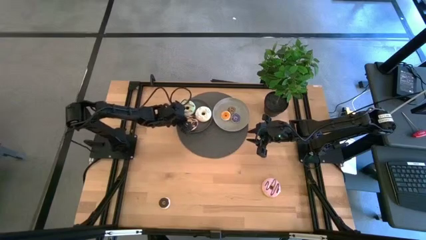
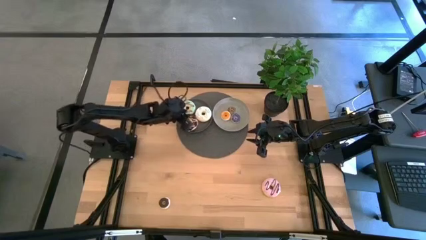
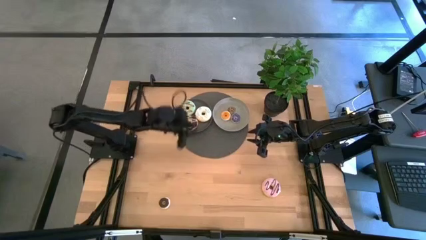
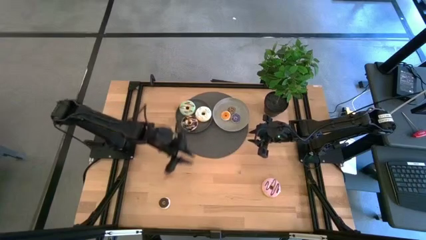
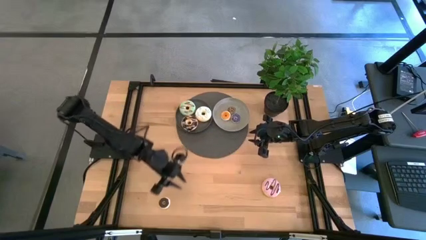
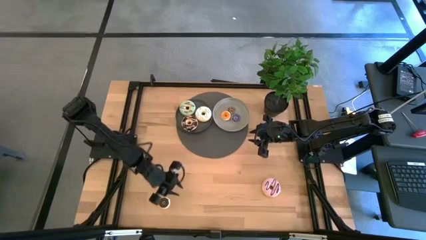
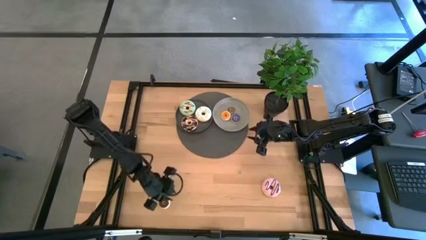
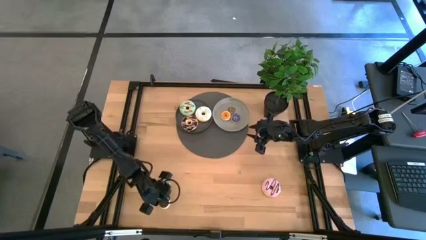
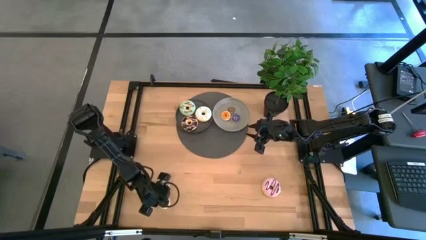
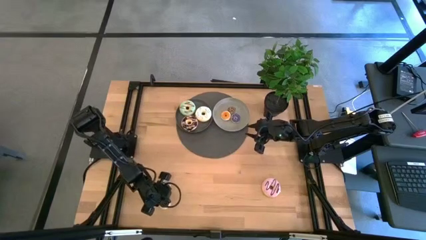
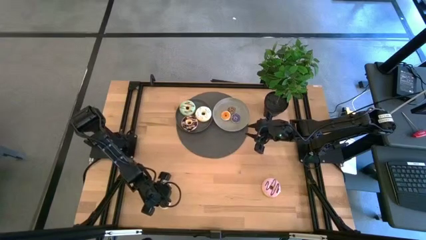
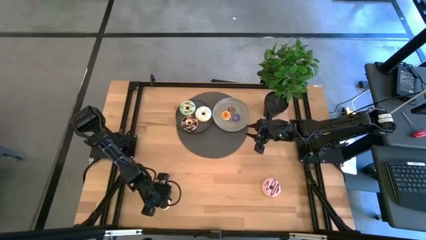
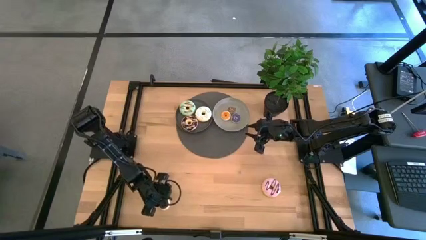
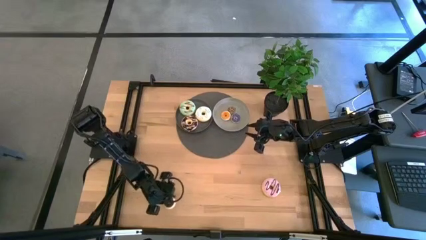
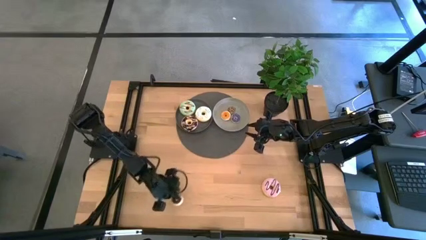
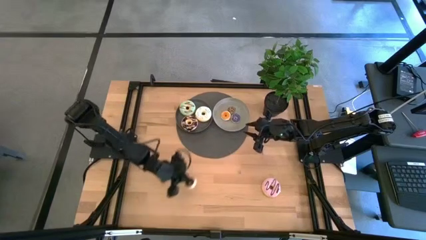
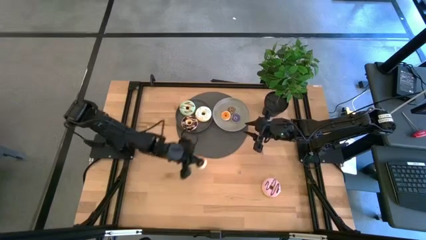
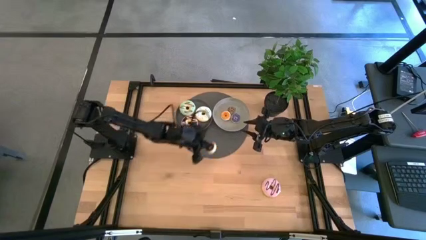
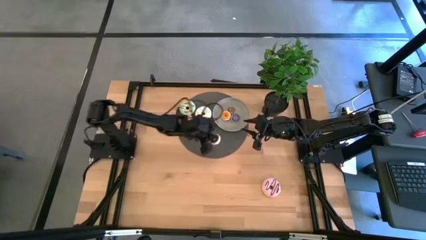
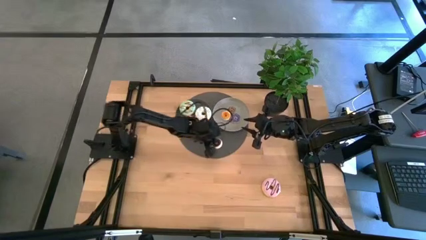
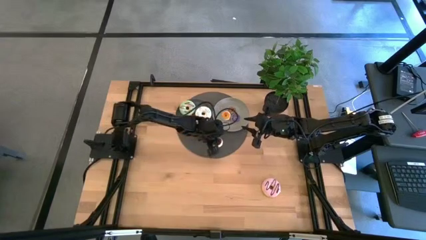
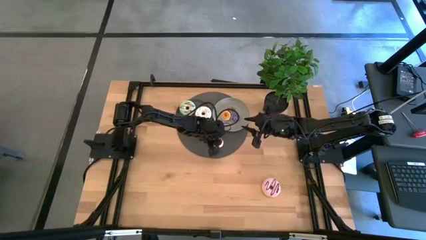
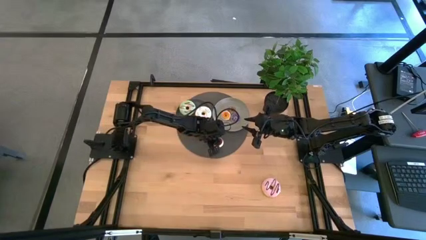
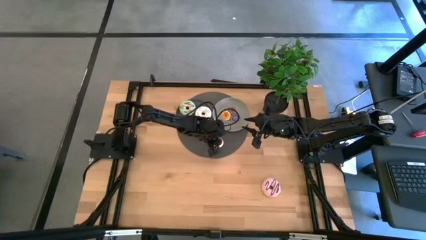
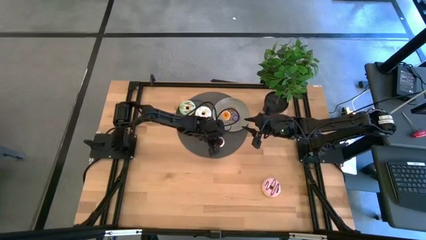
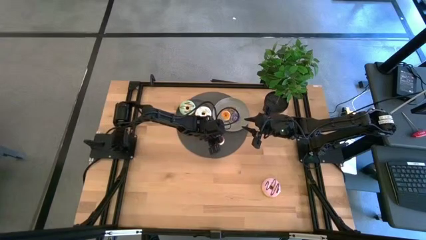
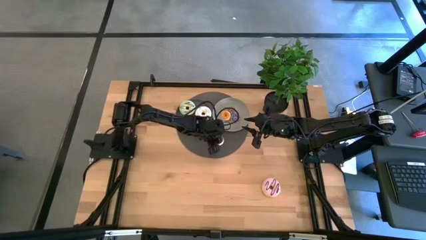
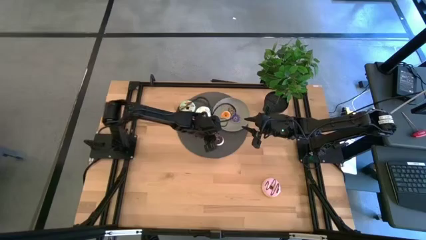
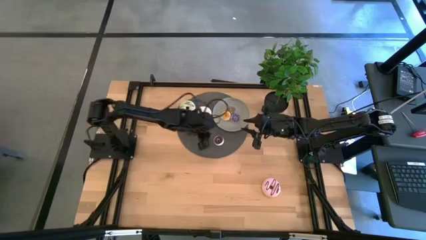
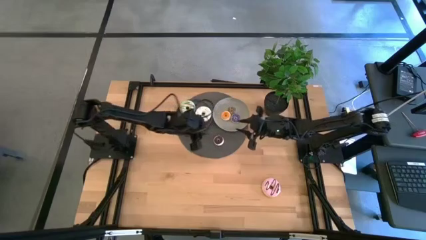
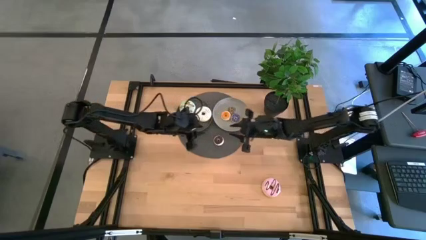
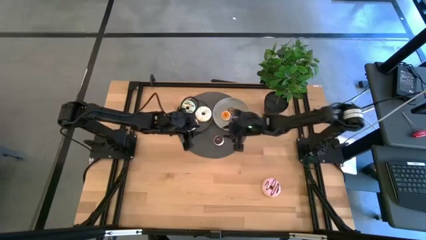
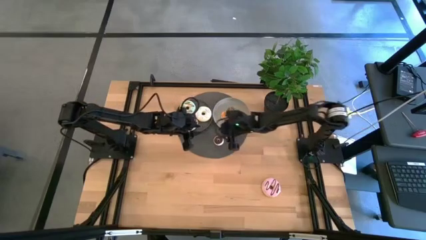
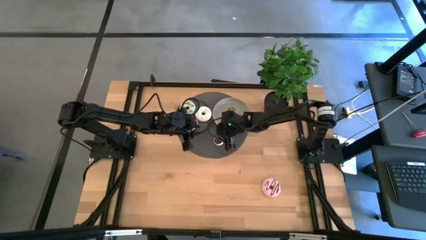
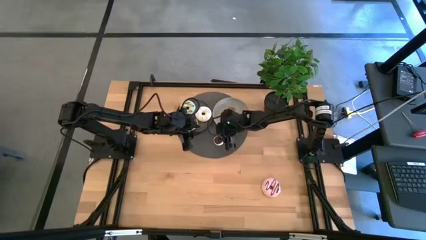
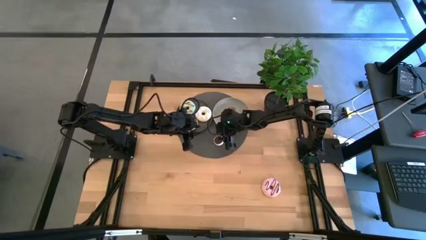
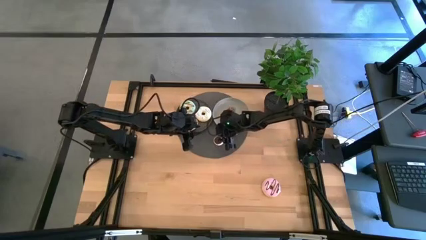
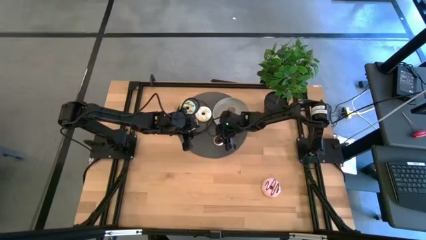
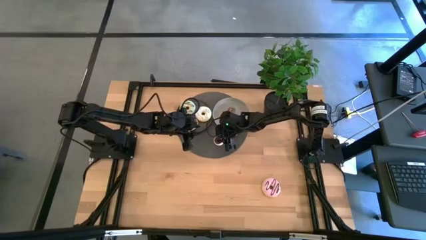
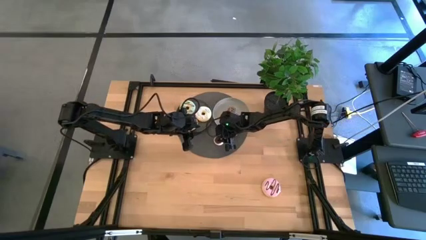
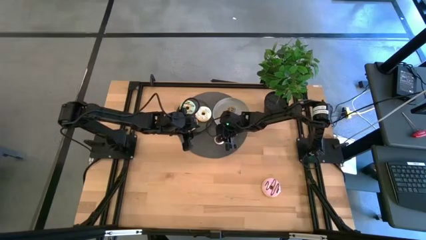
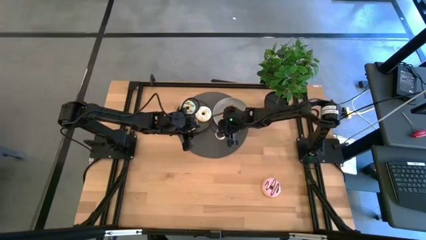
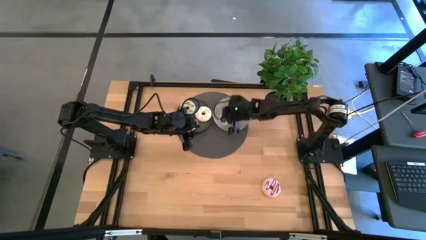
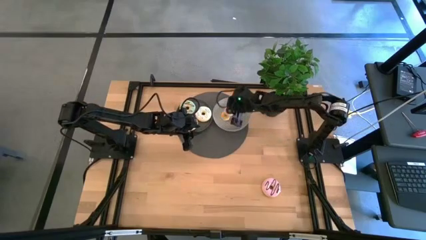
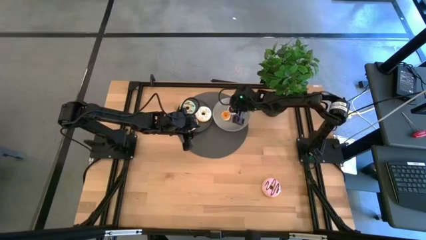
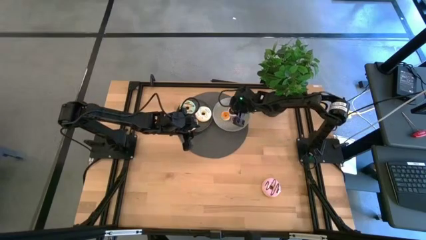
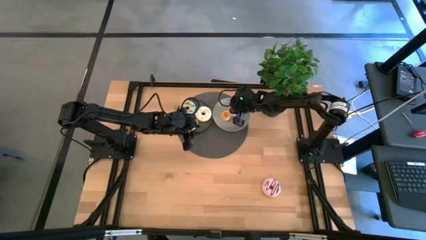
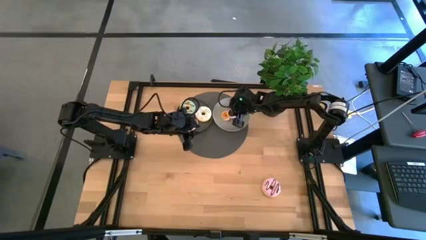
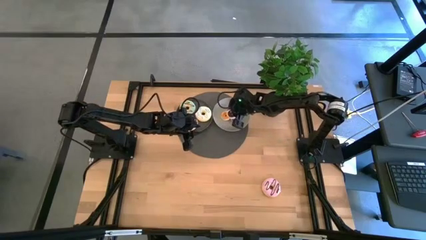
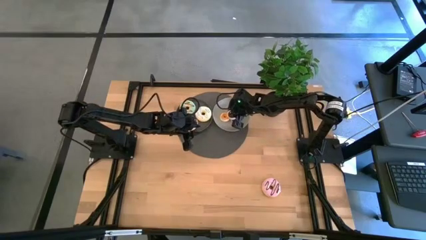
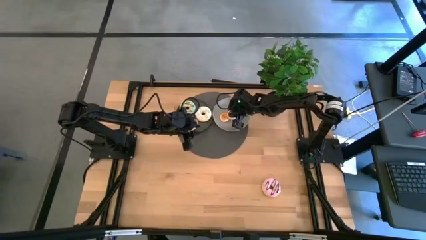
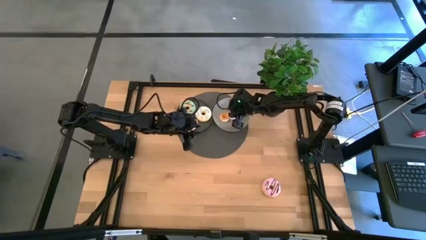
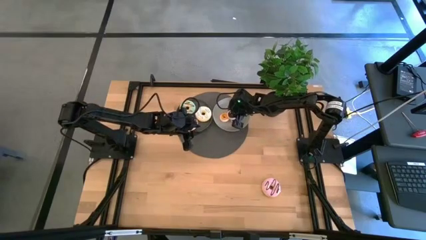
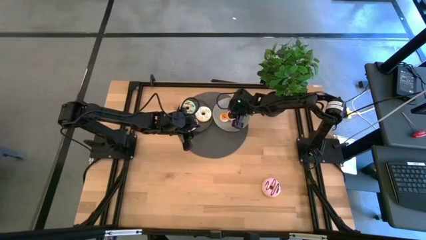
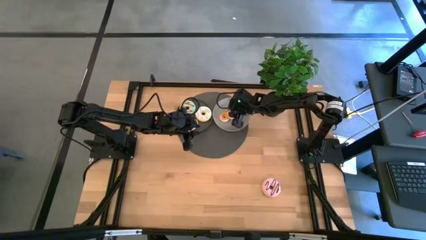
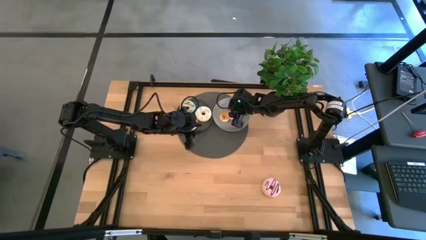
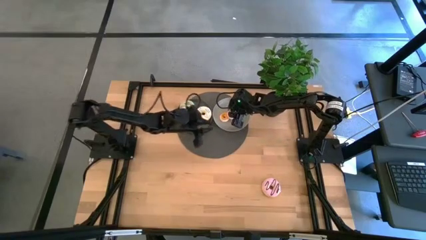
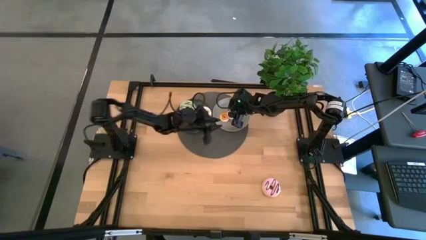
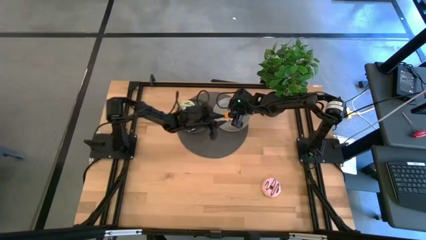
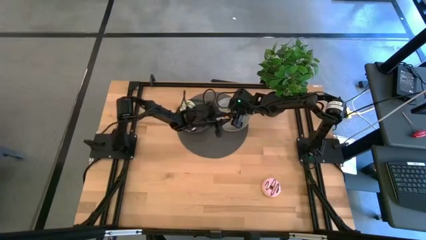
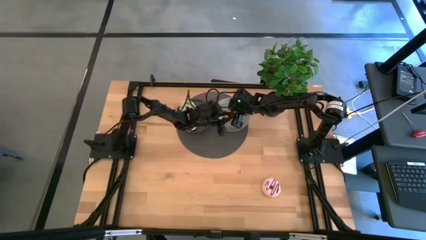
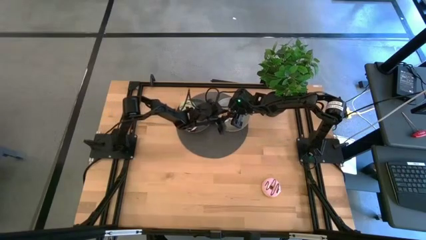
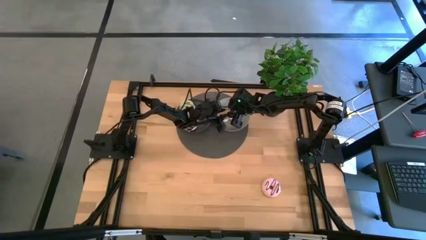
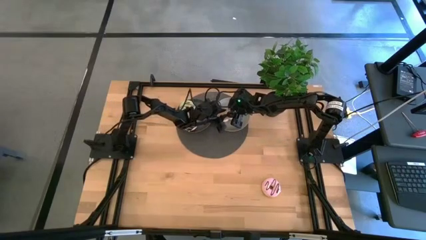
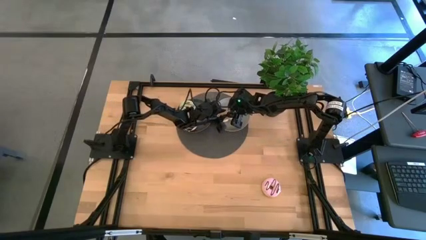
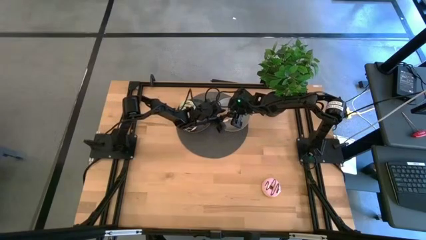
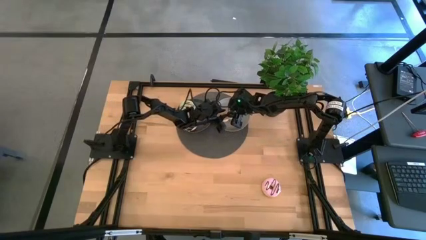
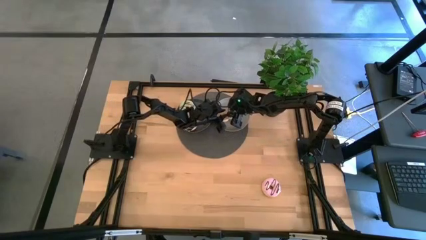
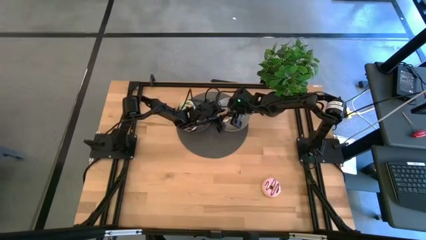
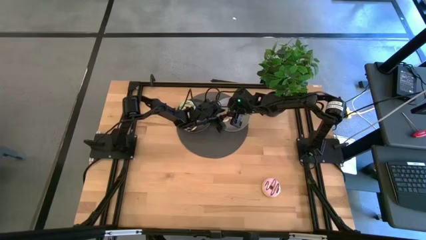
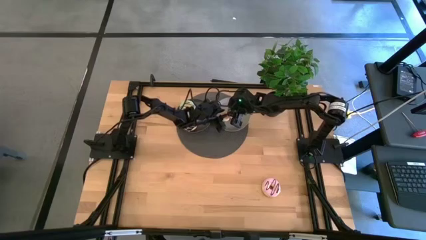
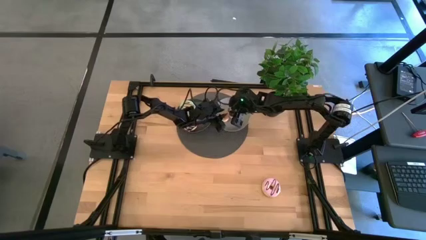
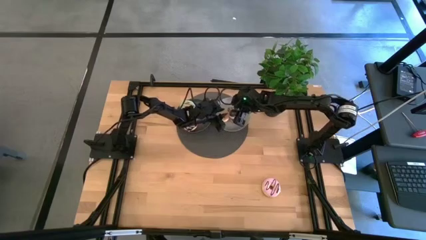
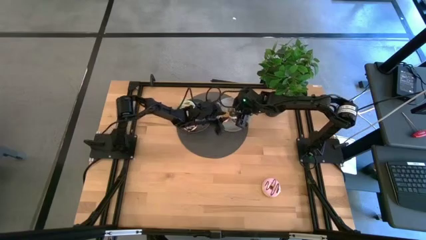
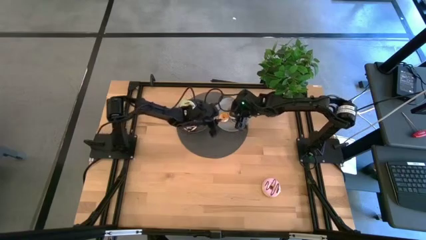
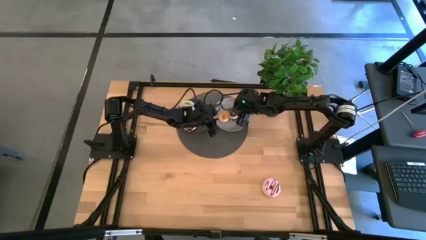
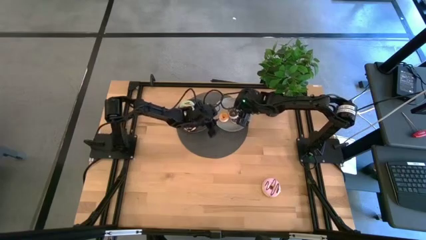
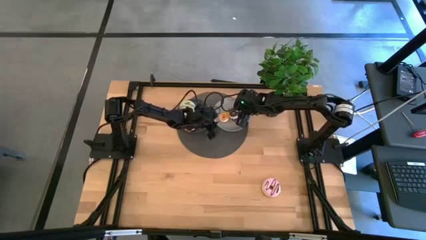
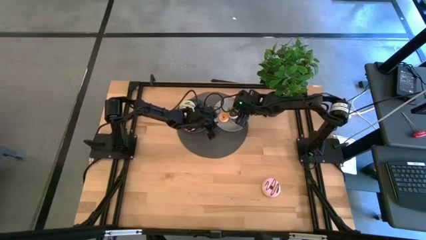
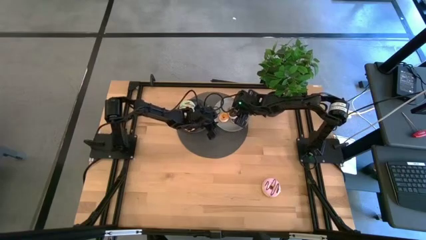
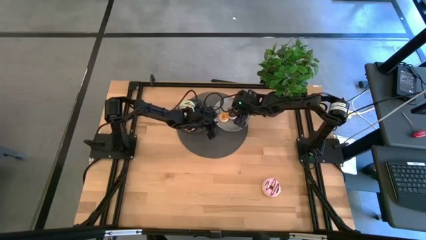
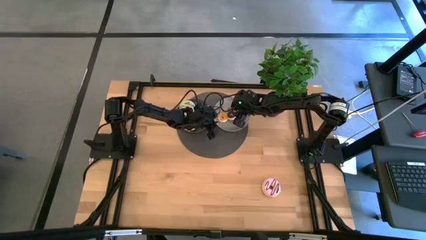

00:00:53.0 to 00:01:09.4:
Task: Pick & Place donuts
Put the small black donut on the gray plate
